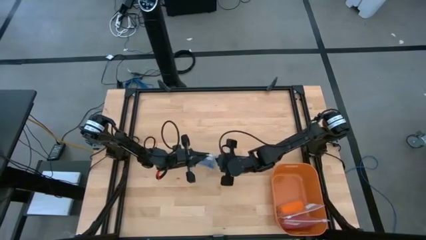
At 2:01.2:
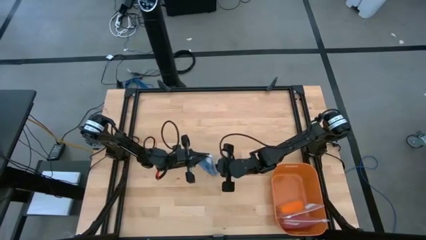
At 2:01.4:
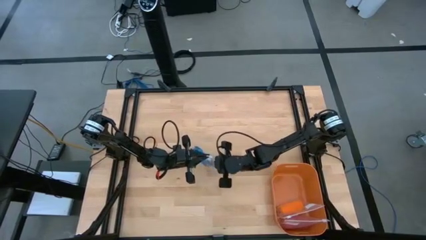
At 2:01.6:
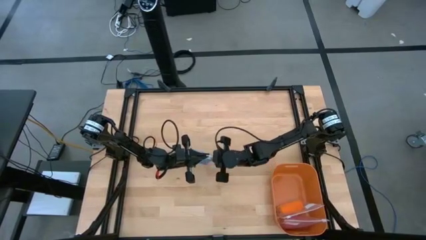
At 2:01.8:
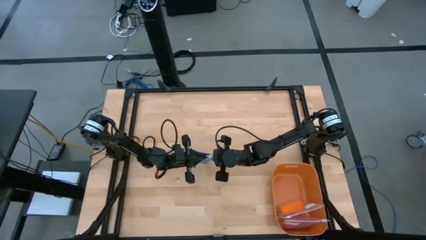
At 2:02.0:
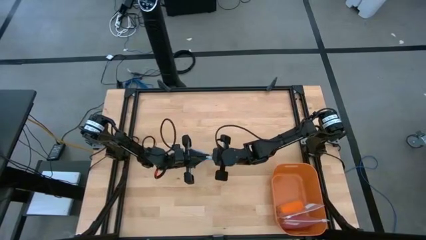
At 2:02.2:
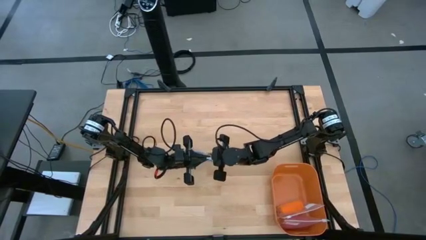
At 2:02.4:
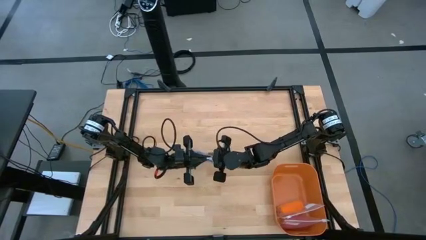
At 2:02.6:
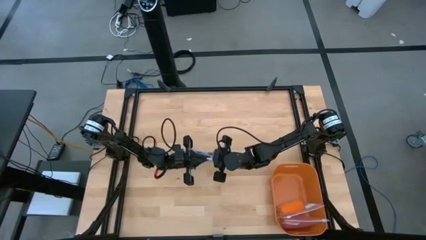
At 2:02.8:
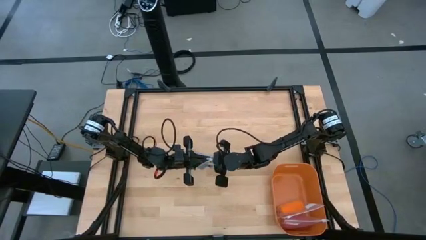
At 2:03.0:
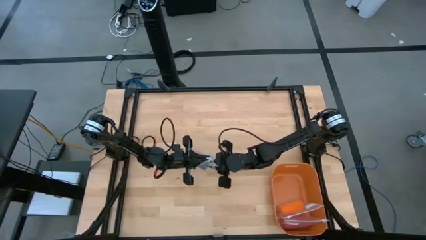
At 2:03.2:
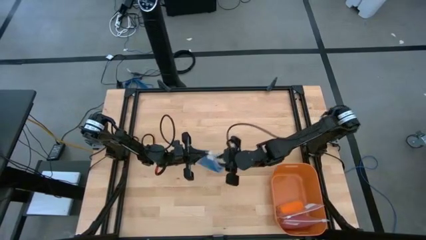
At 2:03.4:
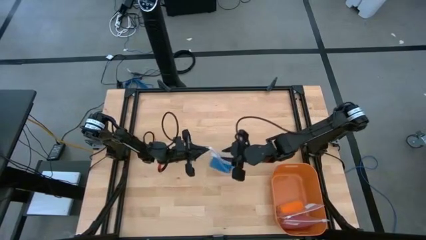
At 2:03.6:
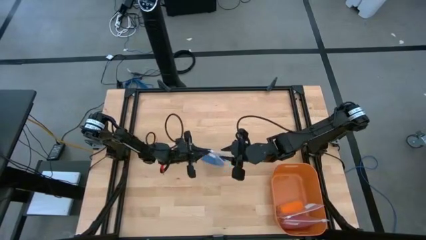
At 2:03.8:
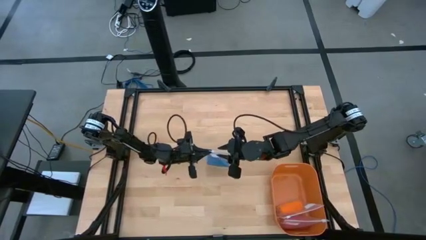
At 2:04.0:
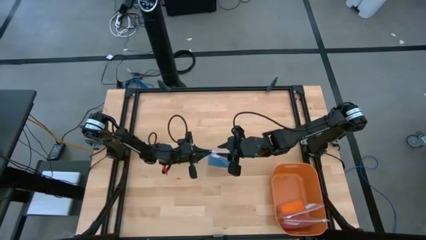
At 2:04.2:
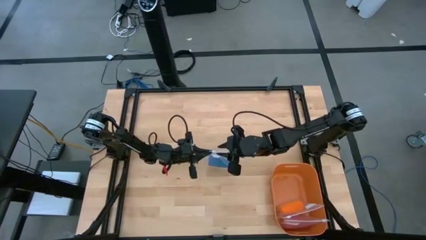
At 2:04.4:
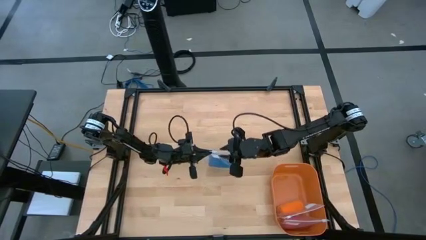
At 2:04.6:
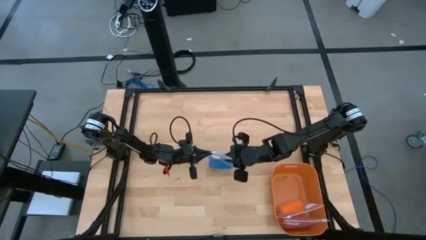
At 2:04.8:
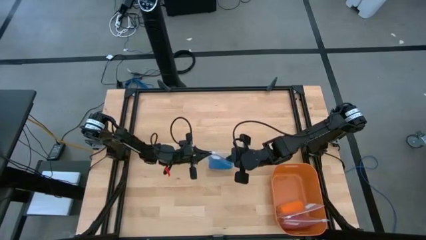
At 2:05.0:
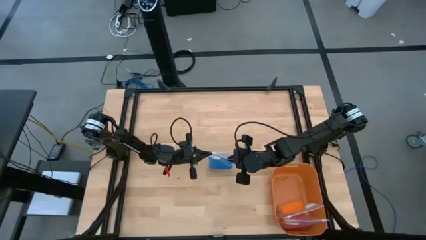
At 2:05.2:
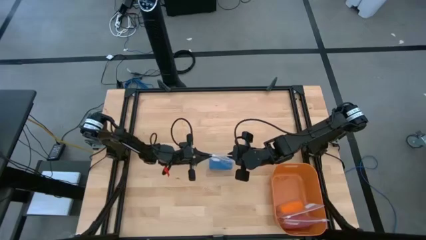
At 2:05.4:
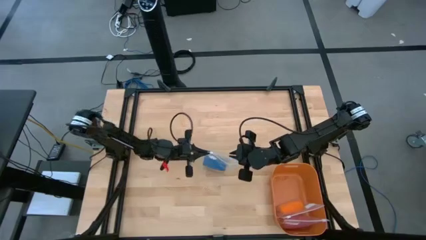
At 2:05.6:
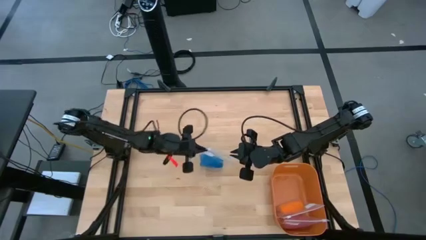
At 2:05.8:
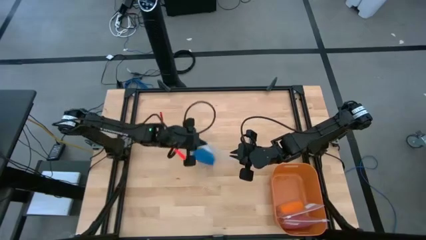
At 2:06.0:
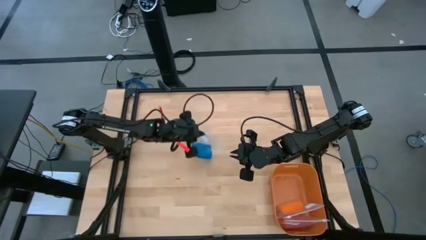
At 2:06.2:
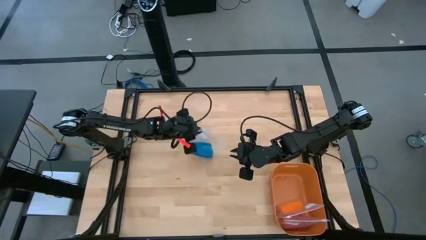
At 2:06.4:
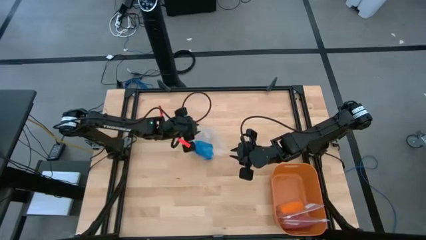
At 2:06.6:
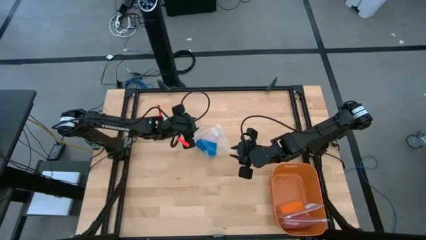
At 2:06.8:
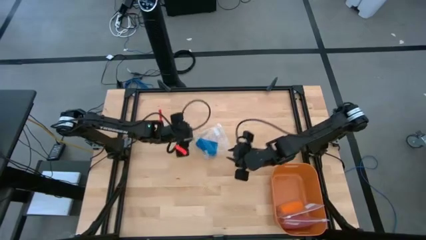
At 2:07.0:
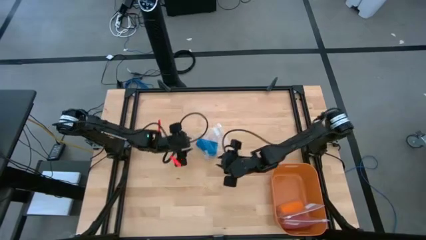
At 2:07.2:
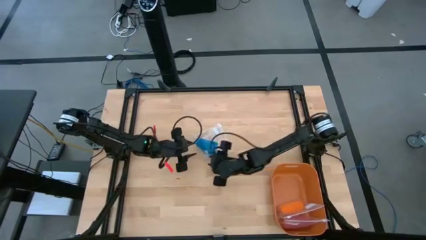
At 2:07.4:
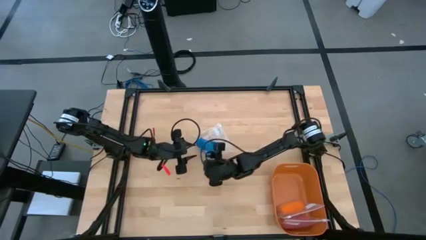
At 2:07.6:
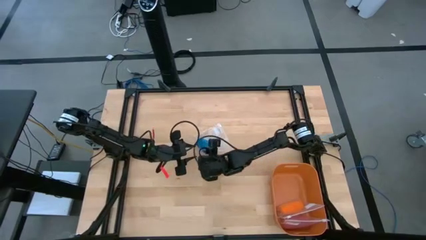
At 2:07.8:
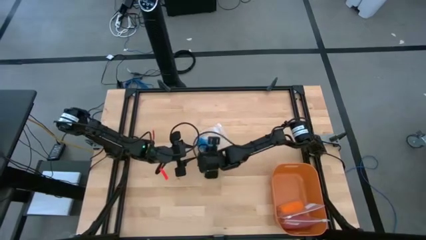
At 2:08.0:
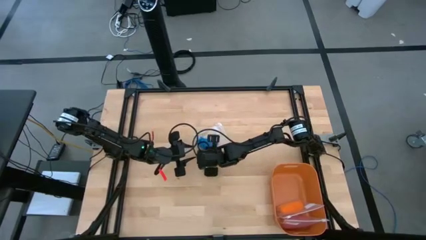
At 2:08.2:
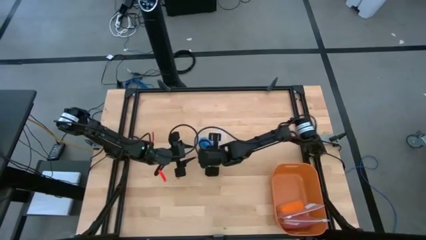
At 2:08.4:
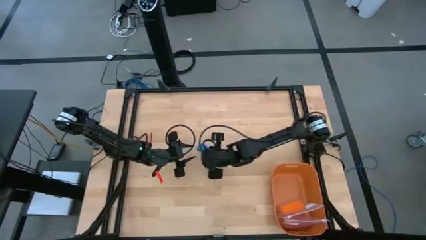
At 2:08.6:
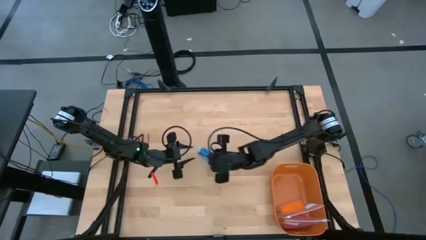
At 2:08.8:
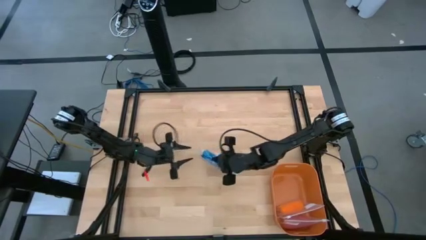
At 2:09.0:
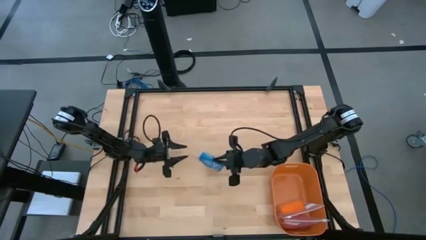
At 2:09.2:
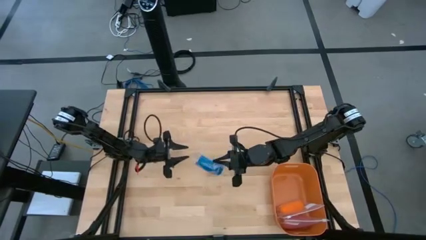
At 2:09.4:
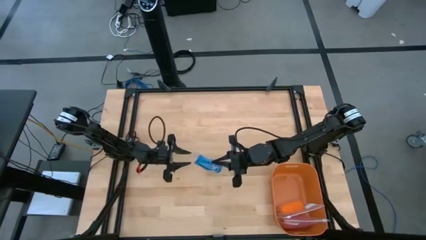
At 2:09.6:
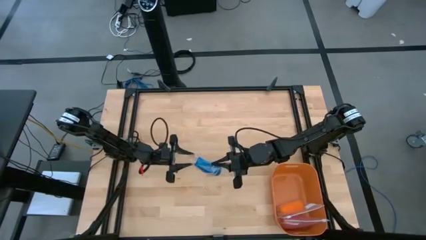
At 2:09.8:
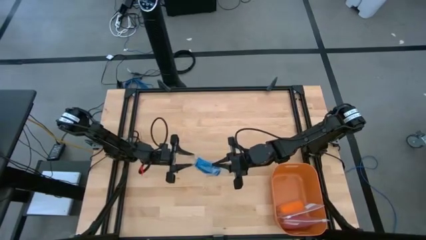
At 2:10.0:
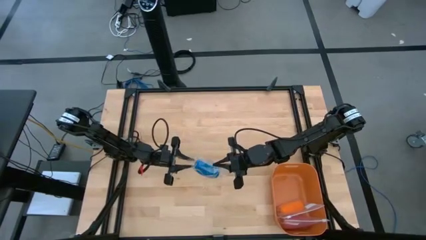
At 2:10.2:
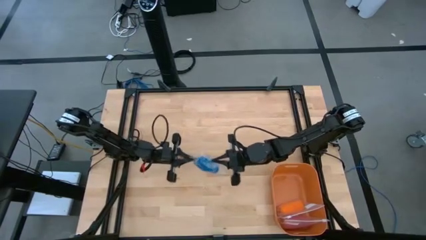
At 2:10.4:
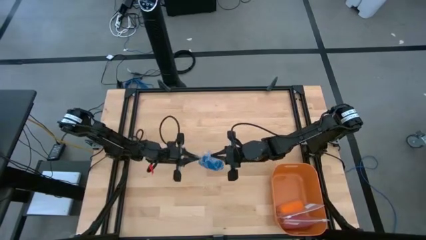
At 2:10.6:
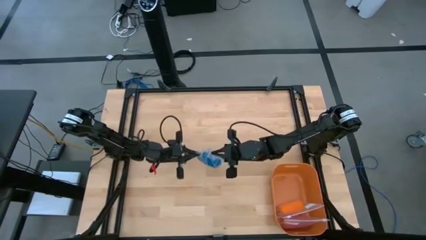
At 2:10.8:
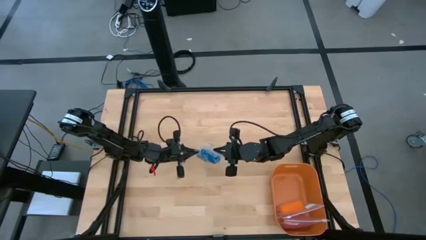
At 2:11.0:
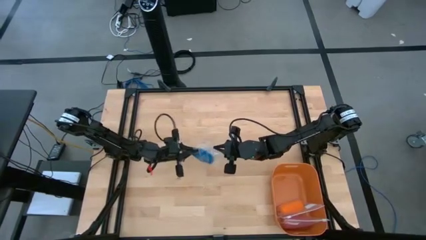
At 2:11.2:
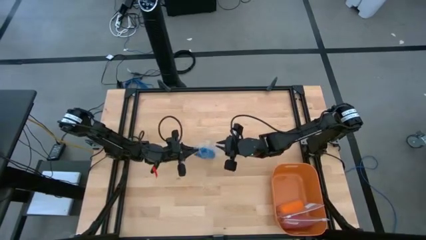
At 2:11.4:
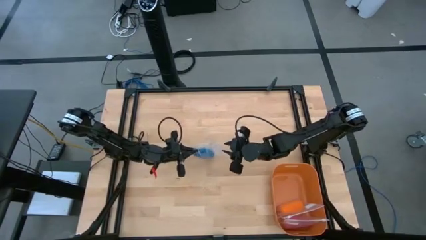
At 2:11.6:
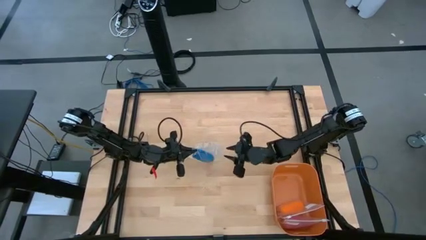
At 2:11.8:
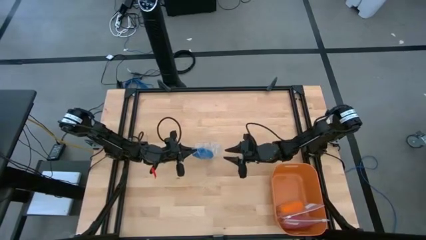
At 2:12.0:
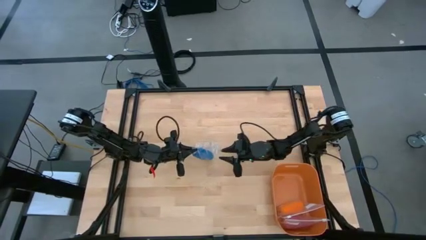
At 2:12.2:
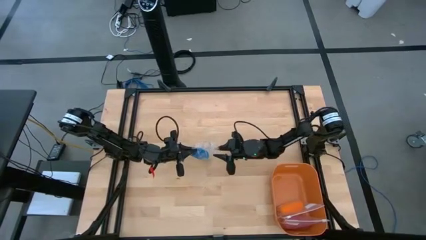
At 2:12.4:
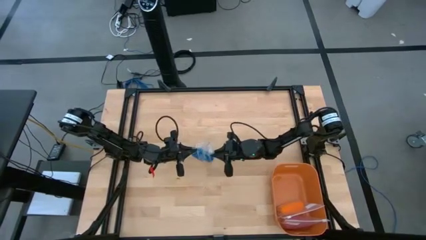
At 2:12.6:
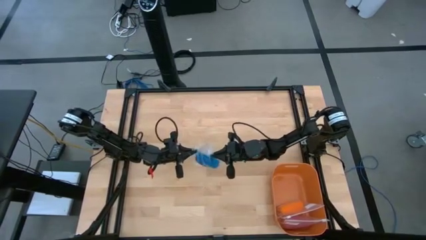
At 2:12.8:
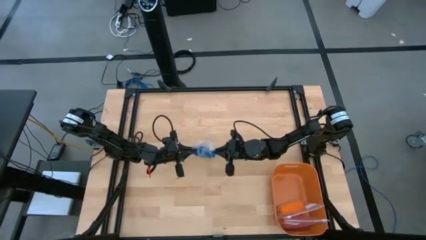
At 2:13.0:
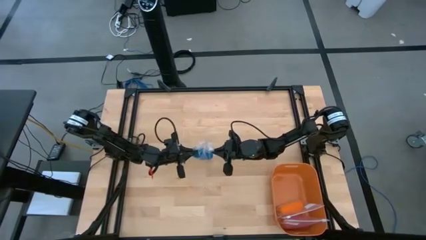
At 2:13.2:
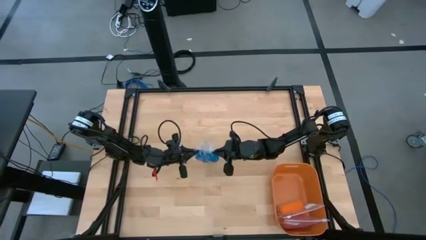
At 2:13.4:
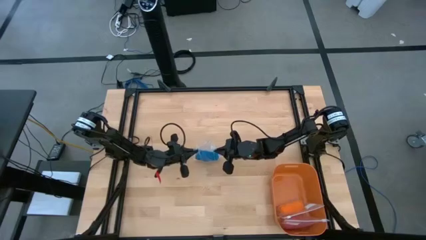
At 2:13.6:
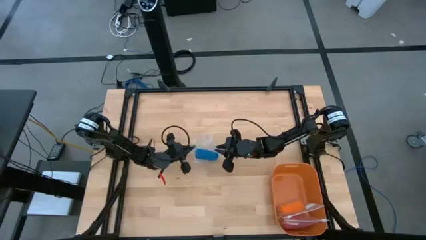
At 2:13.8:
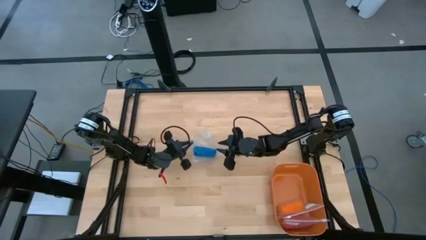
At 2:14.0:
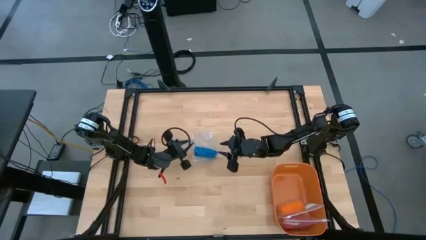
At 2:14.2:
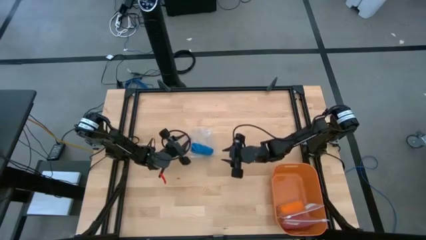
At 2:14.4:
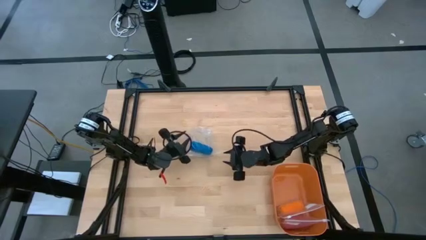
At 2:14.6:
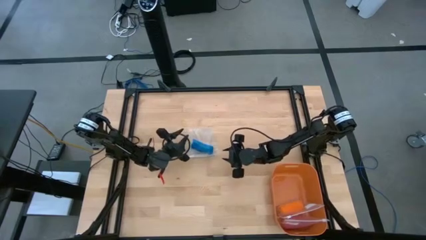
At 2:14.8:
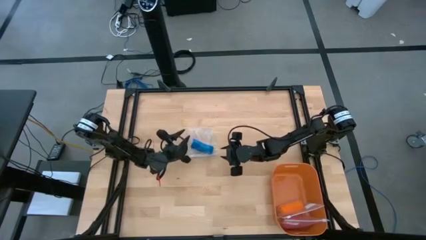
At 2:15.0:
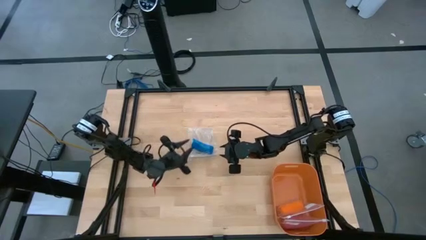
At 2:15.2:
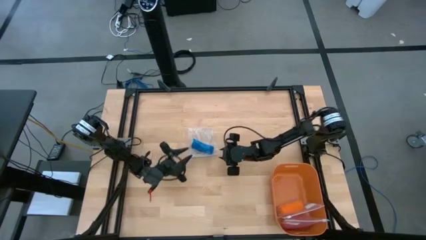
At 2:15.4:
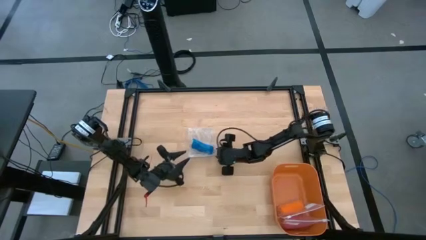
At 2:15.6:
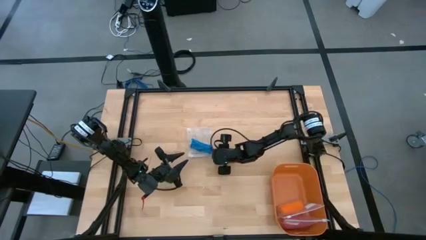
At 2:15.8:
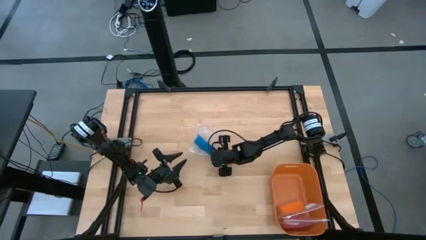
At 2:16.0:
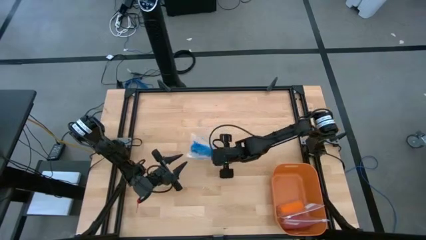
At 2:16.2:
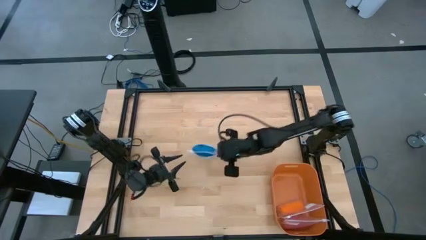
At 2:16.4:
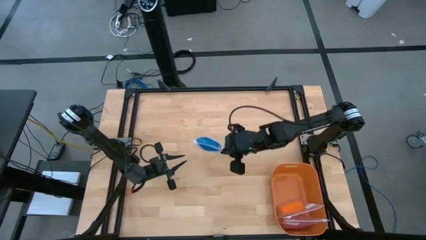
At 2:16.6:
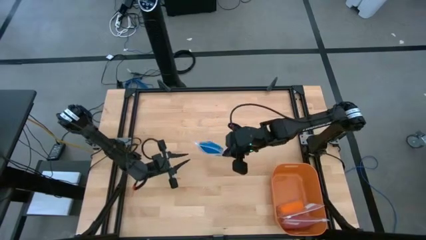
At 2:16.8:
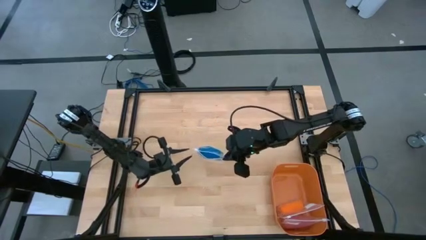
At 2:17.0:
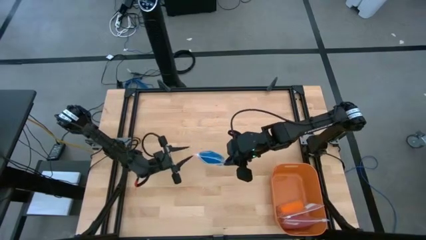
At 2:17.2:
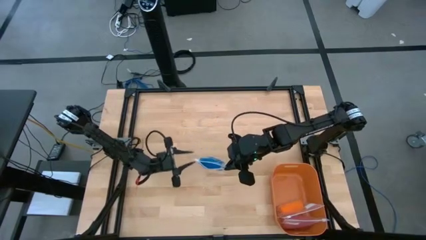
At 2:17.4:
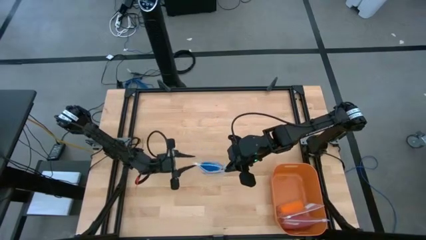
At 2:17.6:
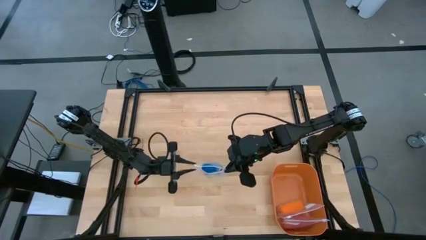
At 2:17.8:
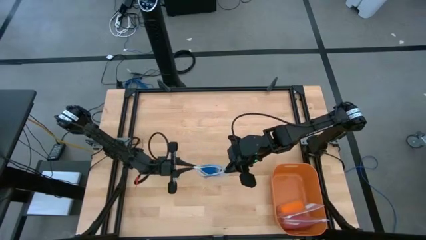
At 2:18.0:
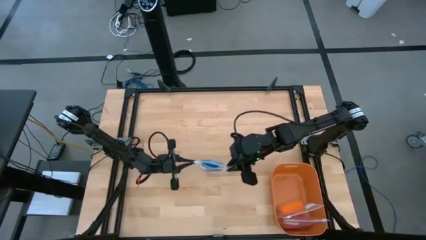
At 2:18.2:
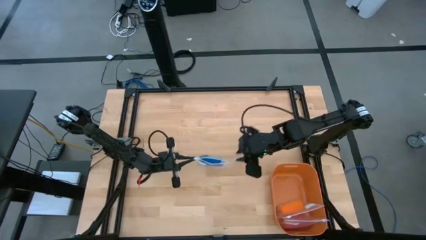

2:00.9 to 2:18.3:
Task: Roll bandage
Put the blue bandage into the transparent zip lock bag
